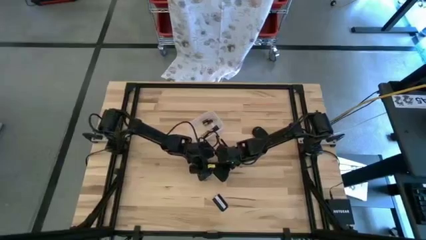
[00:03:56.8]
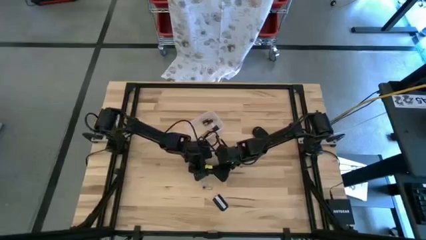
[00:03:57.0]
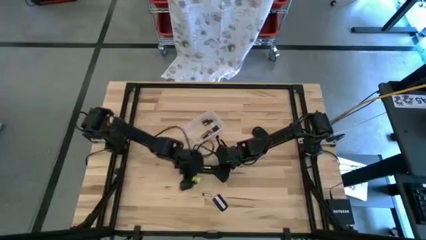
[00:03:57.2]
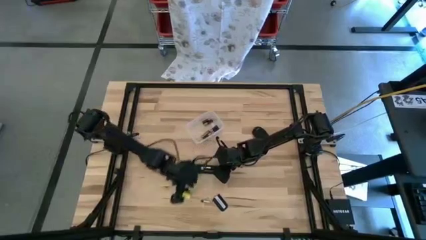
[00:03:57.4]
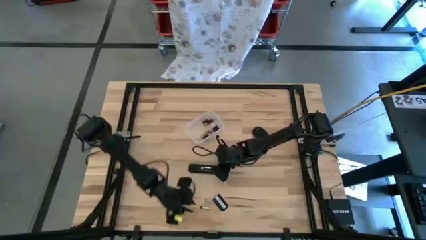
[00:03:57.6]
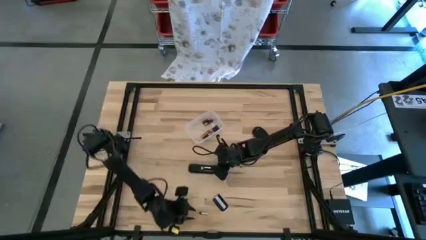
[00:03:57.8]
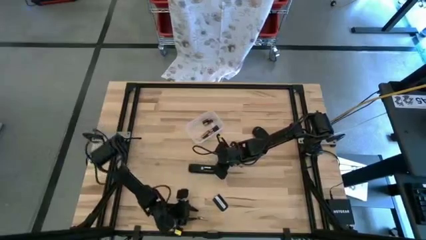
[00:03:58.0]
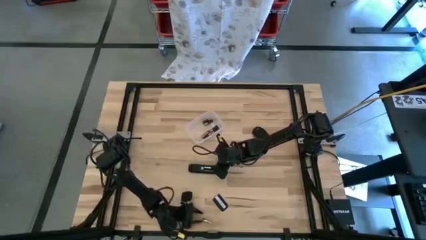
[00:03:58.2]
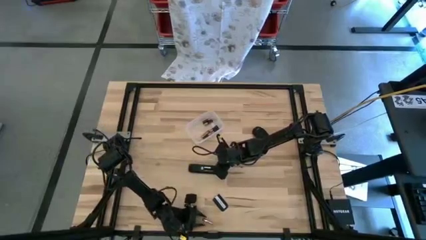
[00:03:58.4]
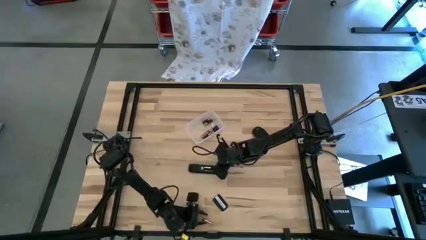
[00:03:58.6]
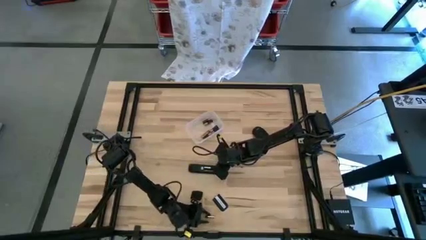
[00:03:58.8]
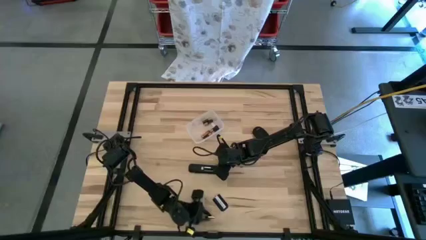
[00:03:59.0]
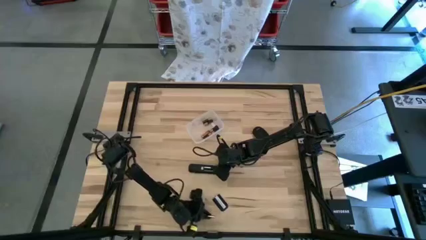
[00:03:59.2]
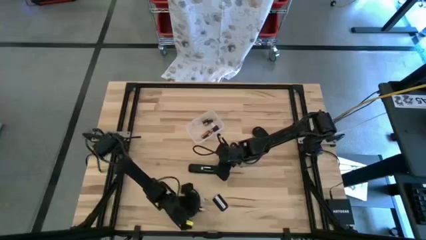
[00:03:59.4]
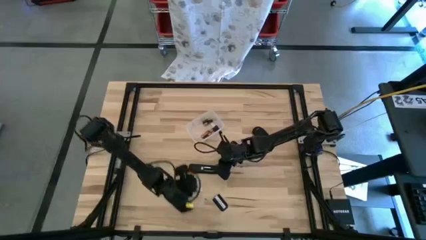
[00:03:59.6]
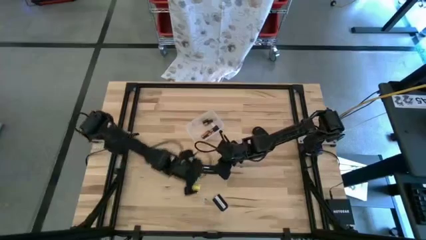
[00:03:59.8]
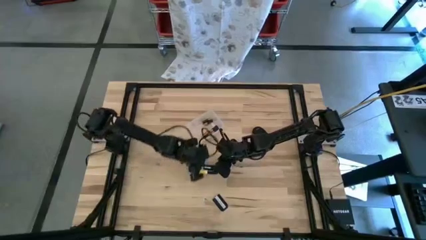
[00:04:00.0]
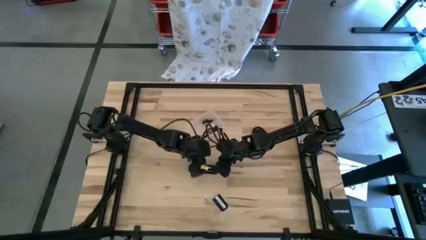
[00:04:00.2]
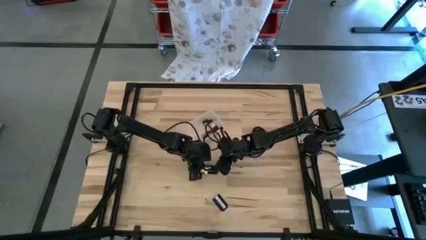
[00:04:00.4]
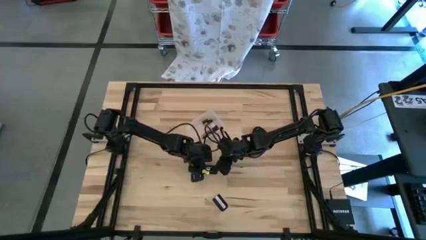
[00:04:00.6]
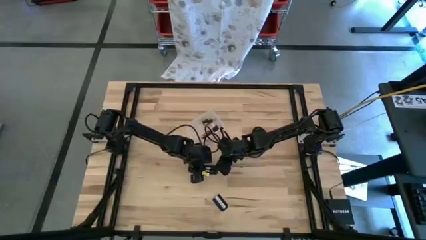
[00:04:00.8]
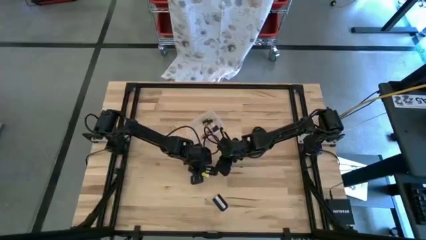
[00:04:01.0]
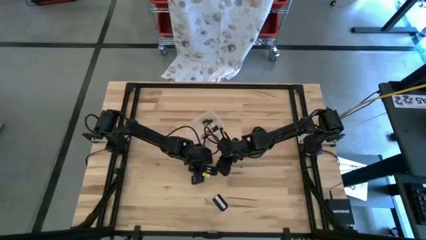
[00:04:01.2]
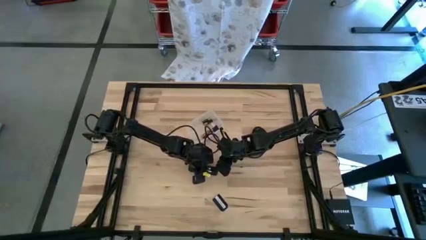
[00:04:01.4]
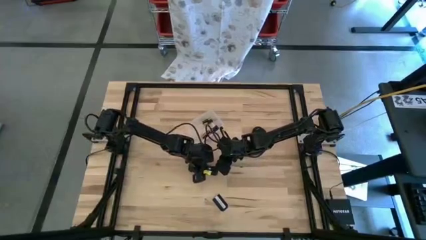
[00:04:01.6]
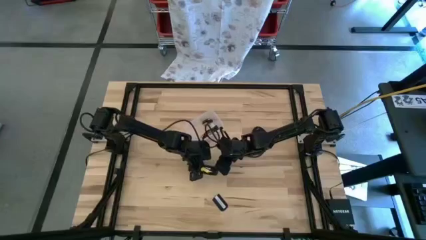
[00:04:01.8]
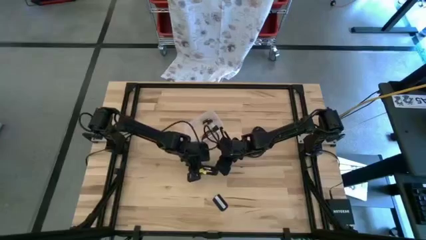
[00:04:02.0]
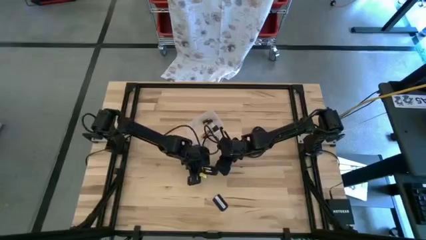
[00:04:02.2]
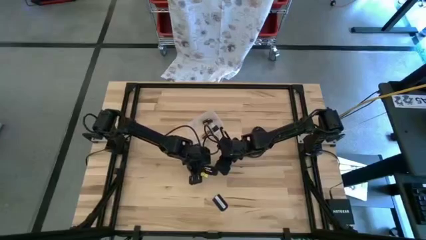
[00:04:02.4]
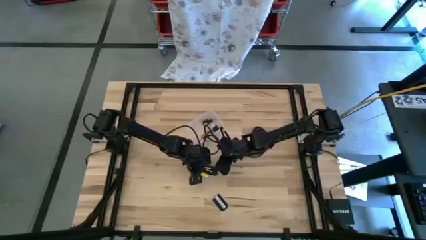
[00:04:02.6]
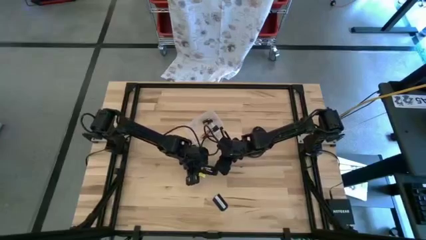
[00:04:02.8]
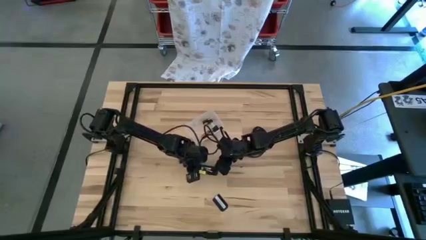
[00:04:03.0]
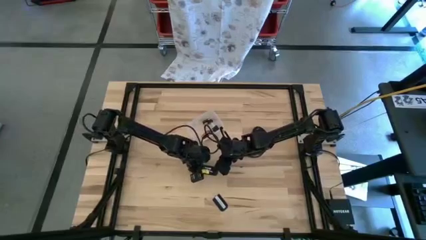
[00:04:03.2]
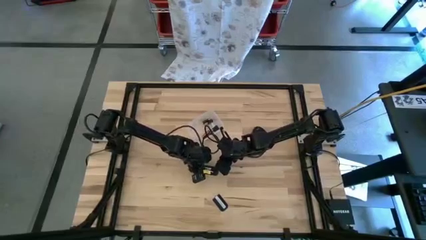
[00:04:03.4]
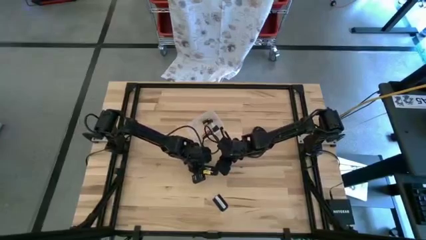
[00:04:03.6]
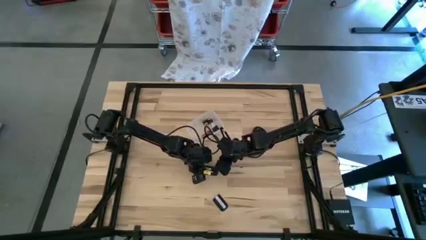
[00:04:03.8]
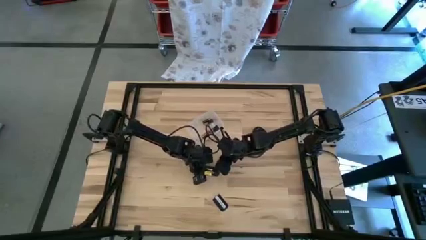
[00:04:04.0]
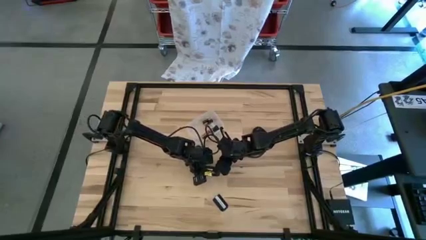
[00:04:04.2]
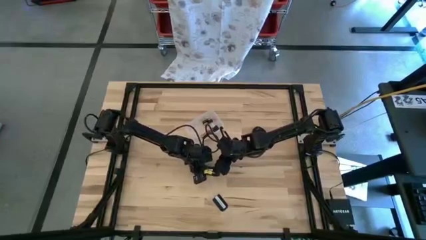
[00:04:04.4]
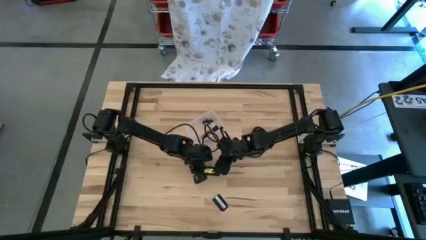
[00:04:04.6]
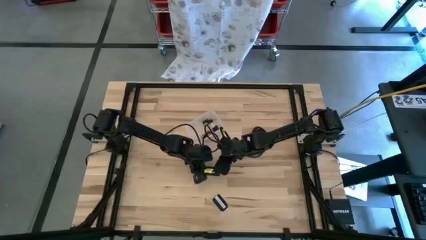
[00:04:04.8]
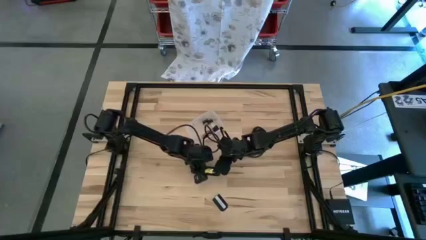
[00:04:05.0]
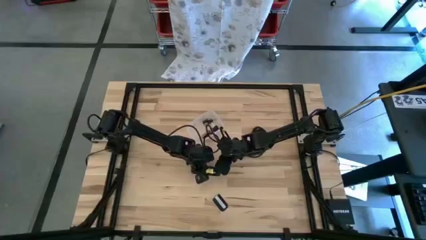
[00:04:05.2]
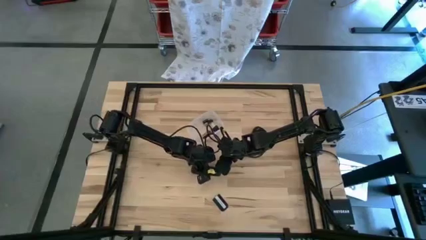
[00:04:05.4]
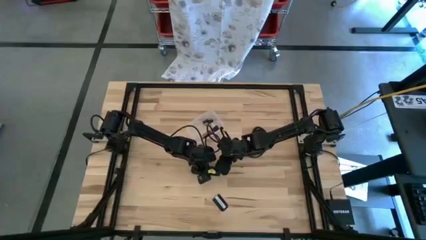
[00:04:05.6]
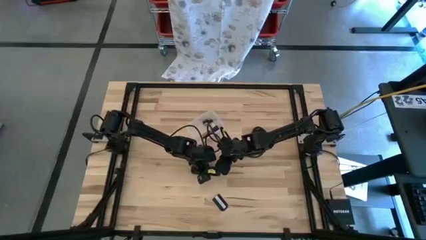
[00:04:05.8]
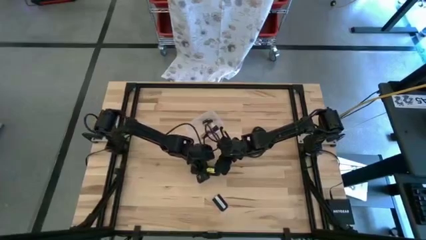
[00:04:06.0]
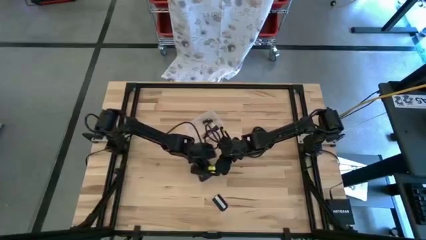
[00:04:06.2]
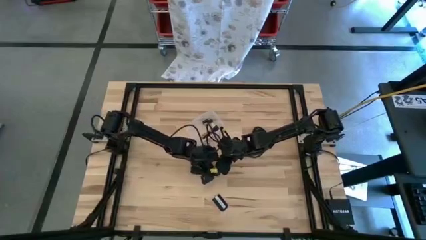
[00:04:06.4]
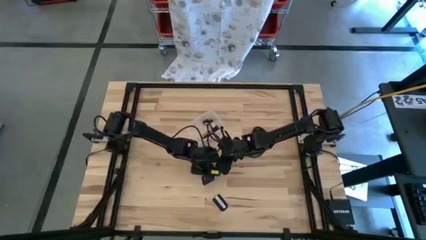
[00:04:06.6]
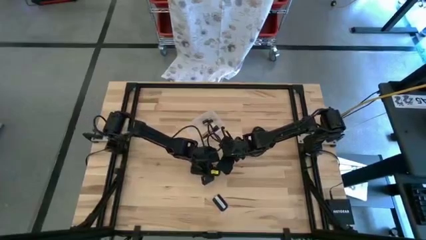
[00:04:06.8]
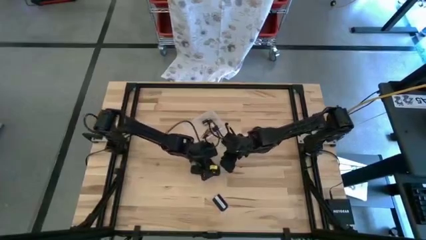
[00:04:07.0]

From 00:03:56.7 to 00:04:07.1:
Task: Insert battery
Insert the silver battery into the remote

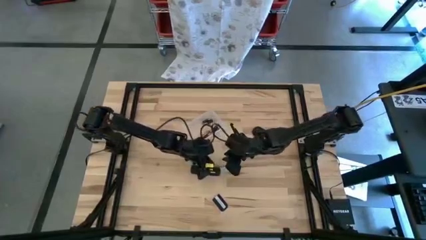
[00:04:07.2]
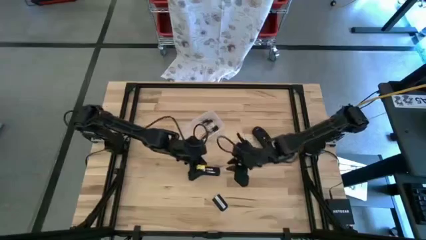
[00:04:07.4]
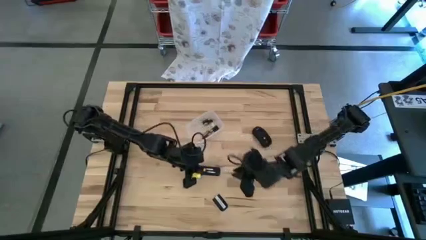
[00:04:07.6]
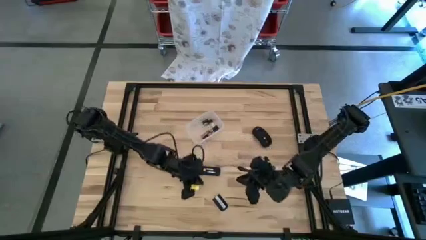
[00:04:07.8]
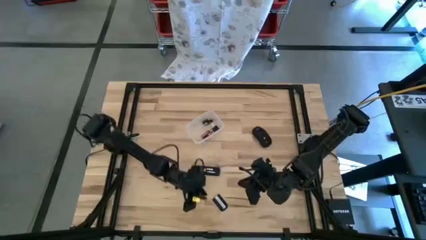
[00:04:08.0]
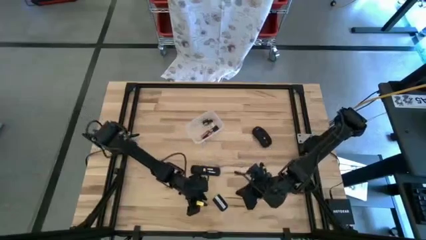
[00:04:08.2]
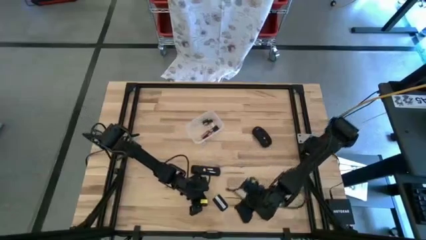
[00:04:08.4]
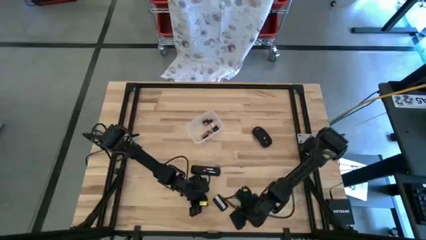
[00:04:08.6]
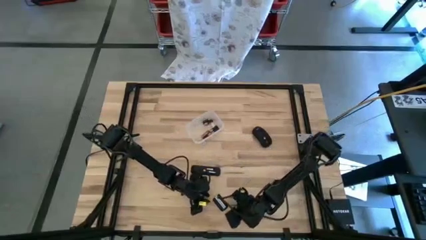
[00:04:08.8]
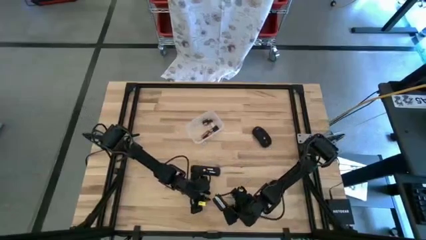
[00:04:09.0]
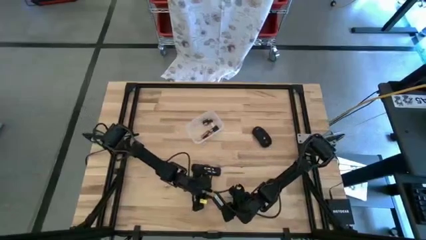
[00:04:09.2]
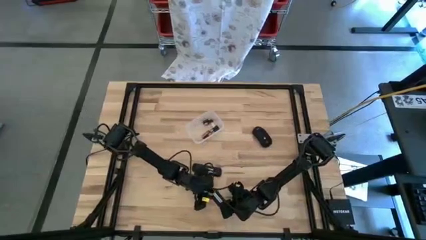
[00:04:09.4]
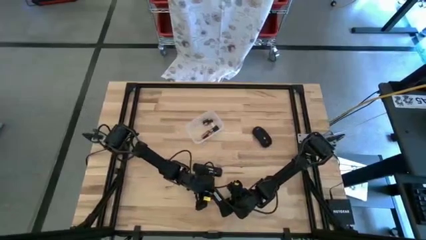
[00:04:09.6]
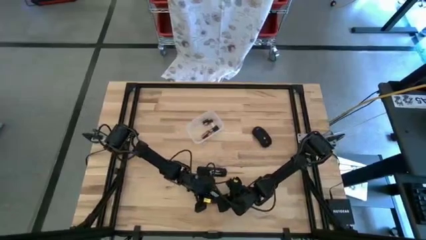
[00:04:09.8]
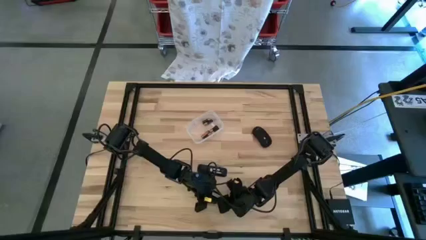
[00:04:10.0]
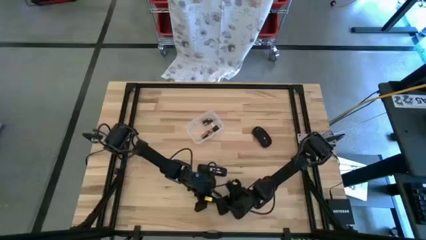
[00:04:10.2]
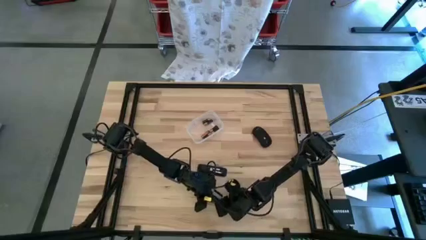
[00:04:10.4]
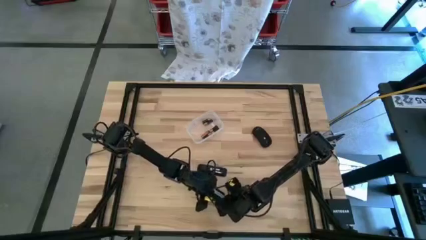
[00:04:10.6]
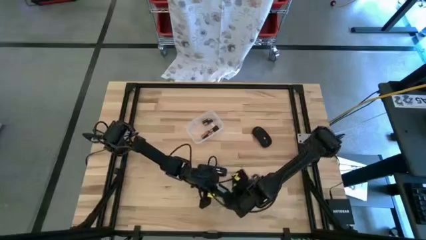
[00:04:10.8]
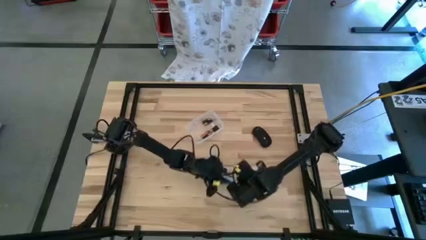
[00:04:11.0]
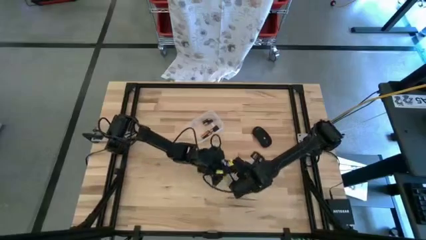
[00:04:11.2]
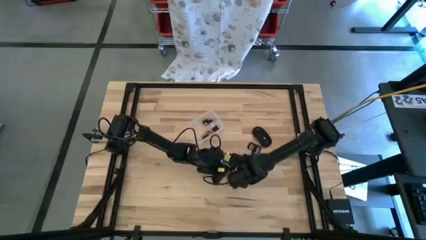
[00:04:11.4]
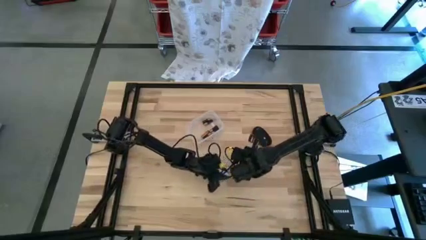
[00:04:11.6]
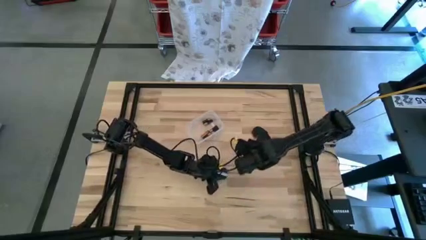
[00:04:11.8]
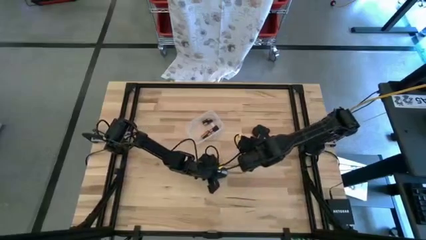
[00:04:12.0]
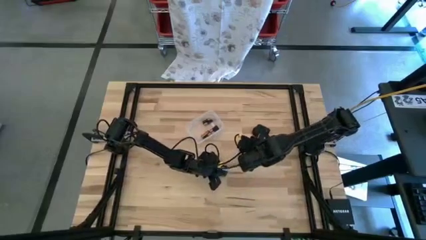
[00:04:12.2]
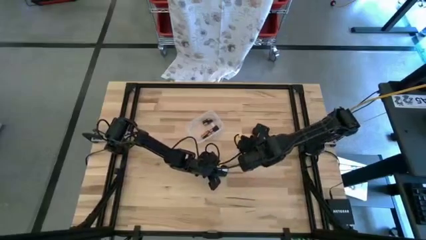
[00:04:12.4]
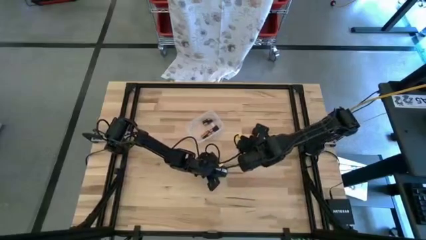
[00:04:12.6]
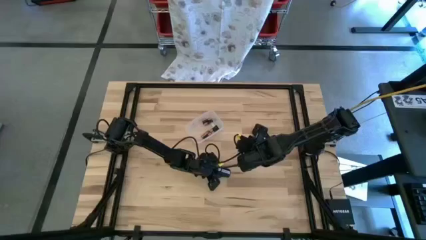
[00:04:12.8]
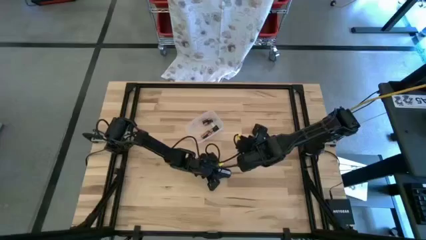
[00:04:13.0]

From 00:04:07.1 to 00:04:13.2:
Close the remote lid on the remote
